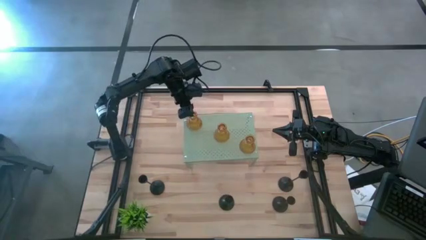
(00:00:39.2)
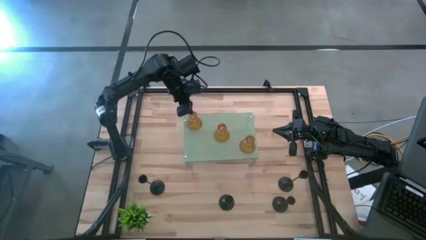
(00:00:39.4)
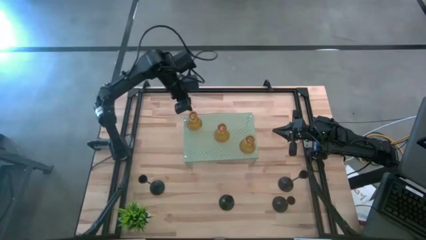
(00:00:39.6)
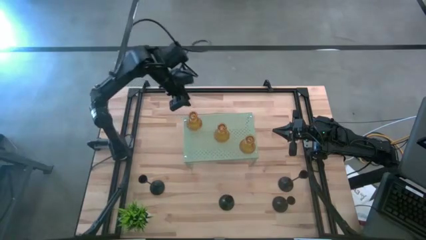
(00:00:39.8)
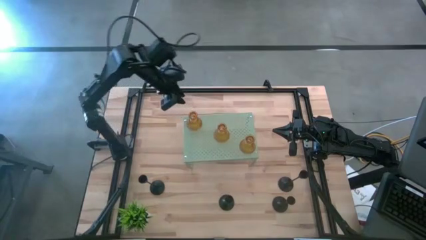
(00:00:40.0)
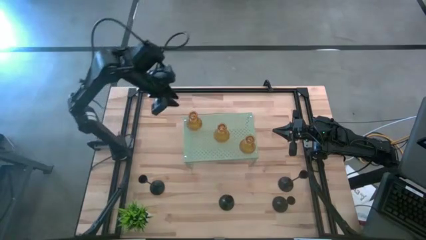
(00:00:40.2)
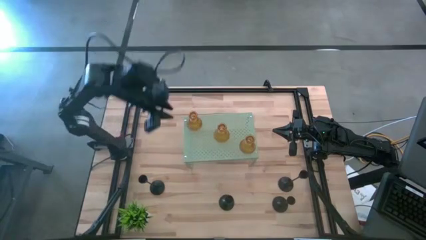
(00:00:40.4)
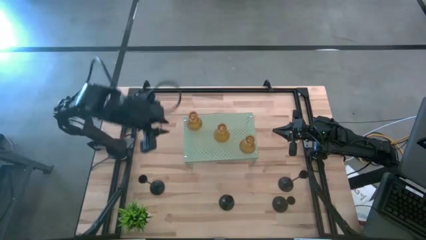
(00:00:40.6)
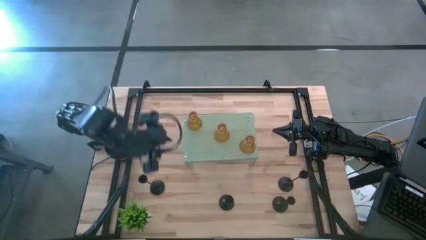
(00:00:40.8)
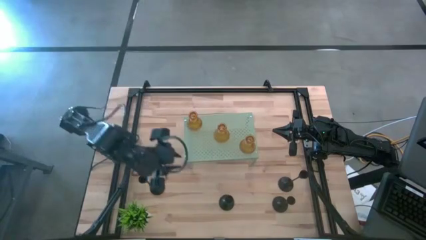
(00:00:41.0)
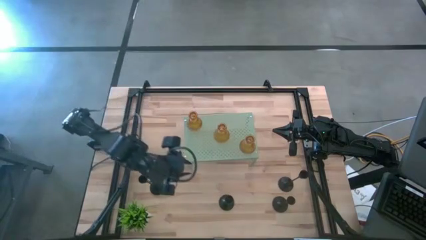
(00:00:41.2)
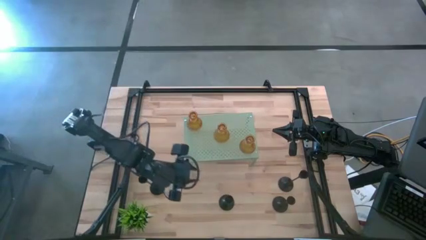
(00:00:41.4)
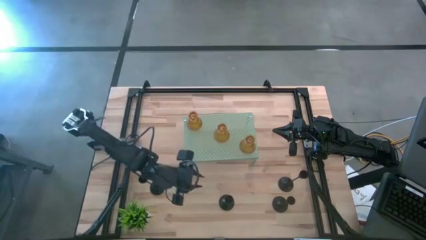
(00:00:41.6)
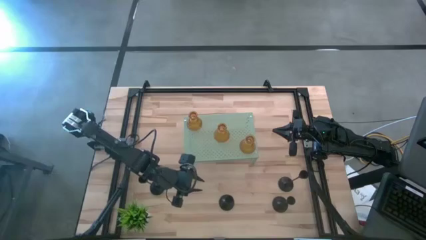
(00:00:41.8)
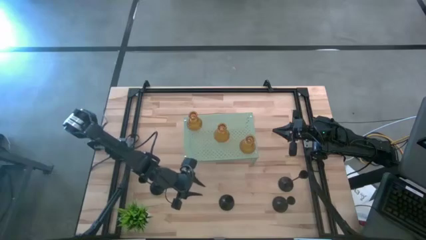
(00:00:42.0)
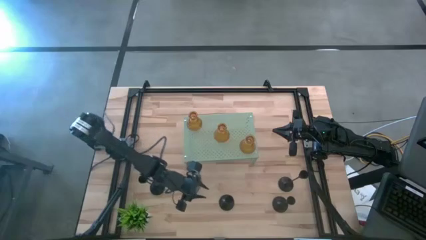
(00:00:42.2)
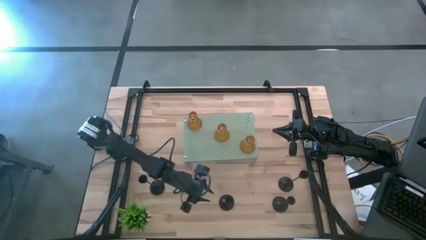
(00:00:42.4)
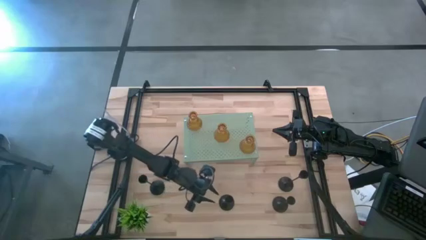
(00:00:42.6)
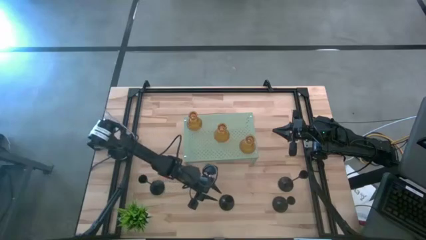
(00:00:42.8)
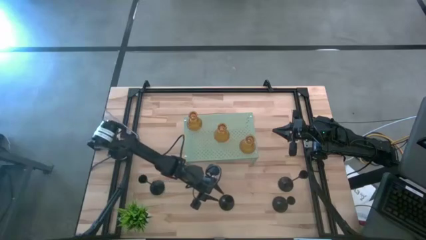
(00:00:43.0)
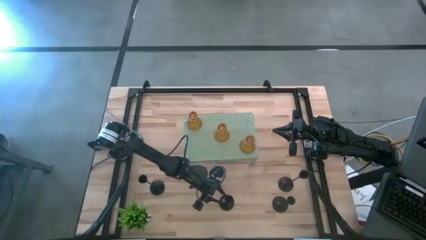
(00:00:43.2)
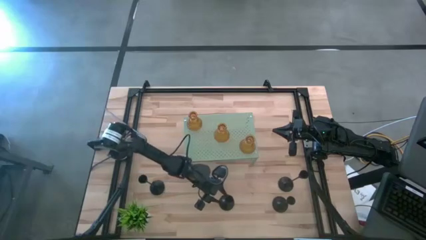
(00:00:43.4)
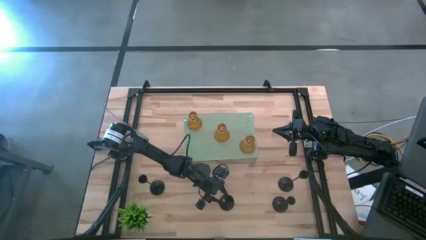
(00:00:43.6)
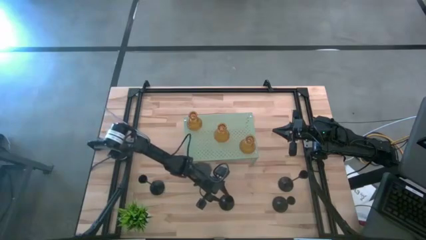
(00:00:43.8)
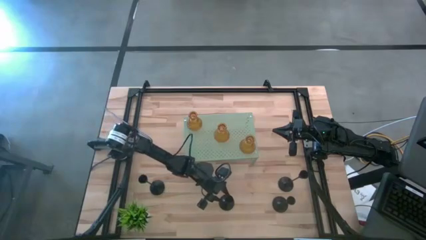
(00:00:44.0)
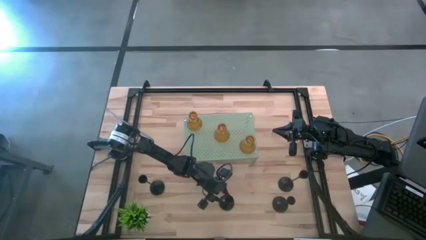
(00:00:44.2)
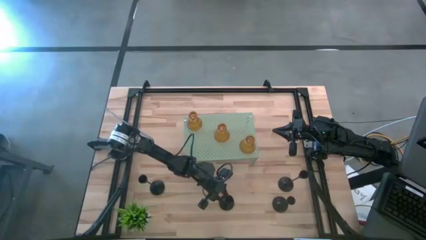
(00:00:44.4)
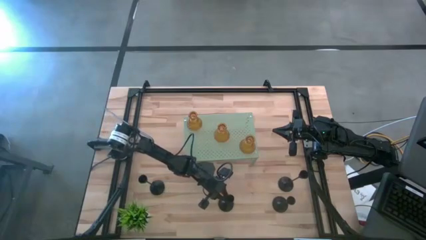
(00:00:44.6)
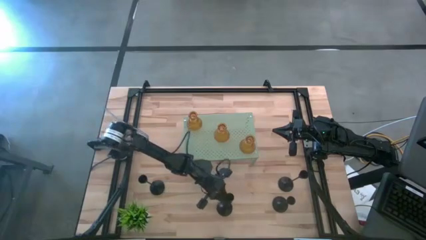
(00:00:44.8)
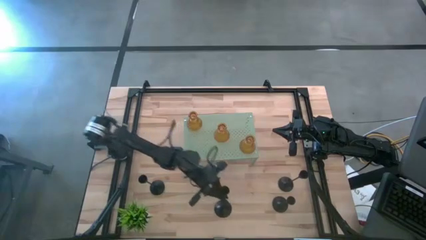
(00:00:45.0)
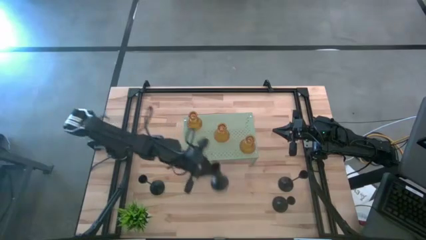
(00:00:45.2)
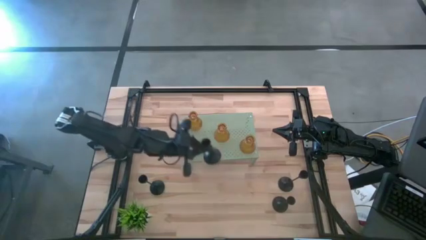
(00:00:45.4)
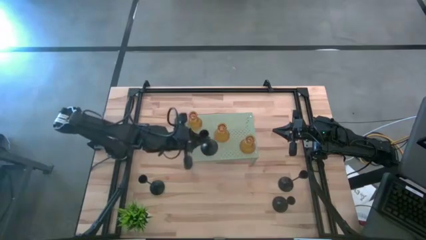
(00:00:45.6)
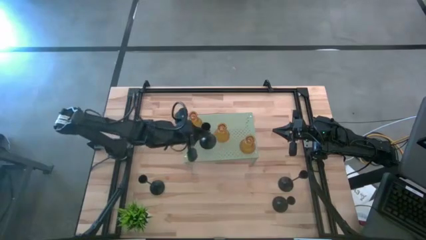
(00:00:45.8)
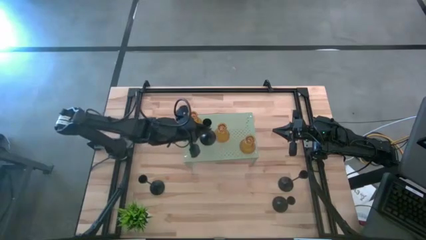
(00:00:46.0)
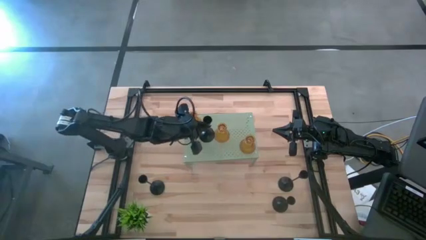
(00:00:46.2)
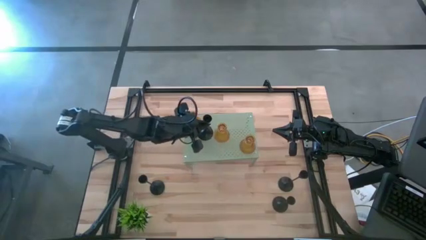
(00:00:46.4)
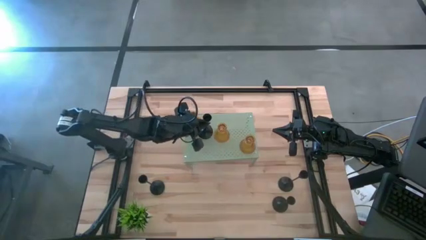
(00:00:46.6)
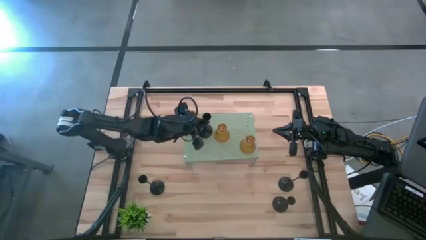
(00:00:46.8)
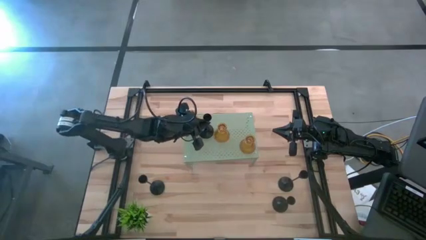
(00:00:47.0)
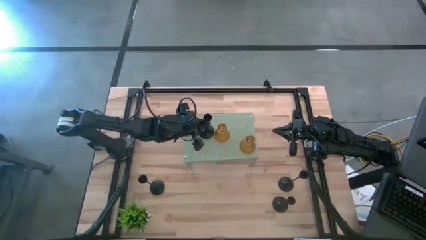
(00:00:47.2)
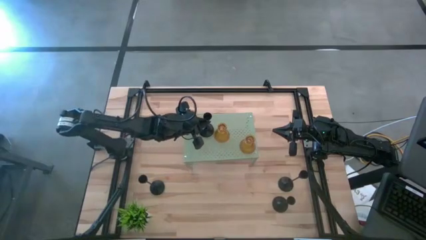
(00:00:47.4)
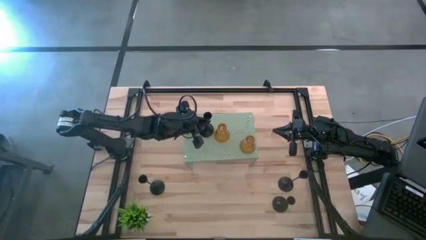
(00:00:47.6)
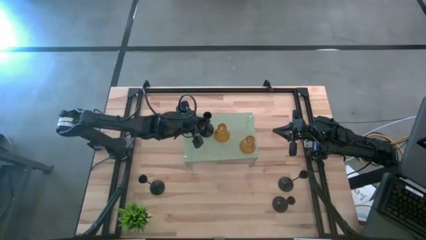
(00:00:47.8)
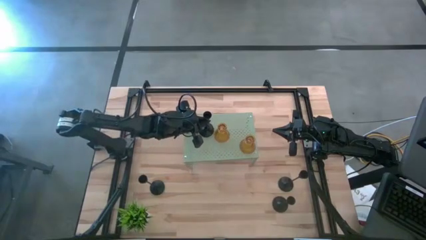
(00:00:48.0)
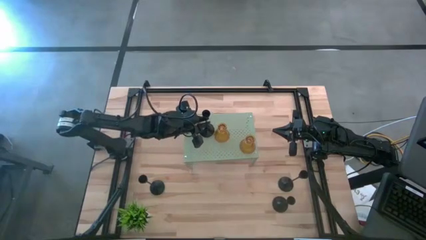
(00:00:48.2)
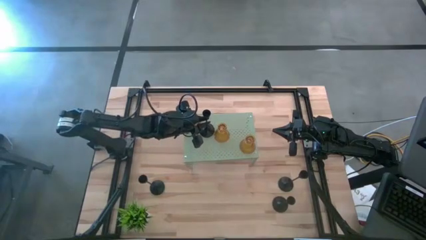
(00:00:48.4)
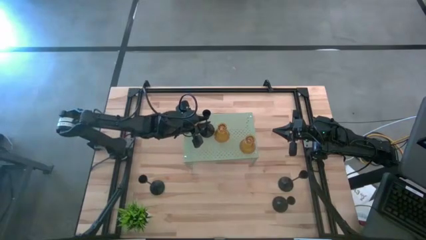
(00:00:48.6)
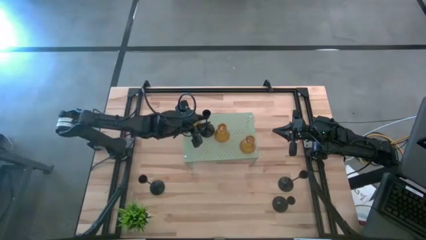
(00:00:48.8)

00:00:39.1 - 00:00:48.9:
Task: Pick & Place candle stick holders
Put the black candle holder on the shelf

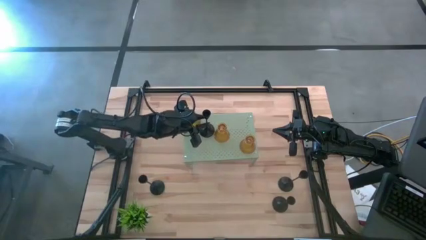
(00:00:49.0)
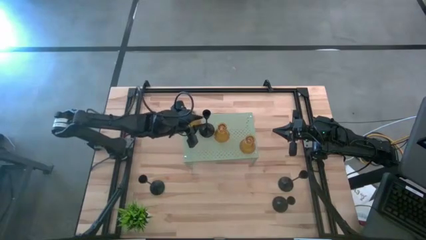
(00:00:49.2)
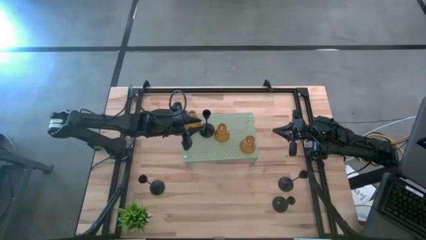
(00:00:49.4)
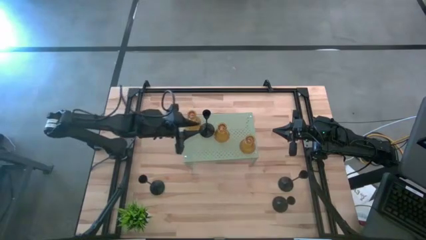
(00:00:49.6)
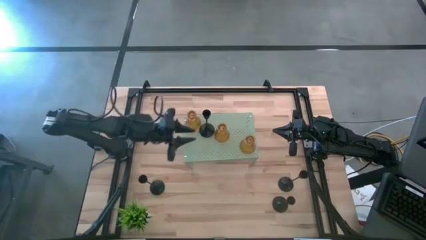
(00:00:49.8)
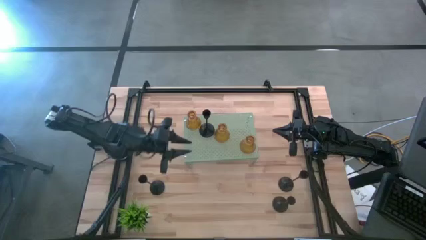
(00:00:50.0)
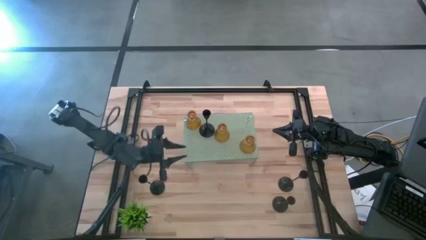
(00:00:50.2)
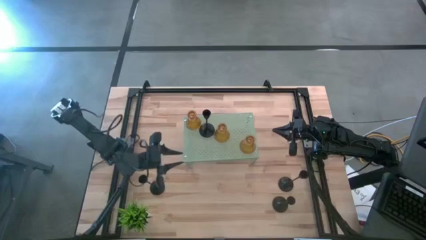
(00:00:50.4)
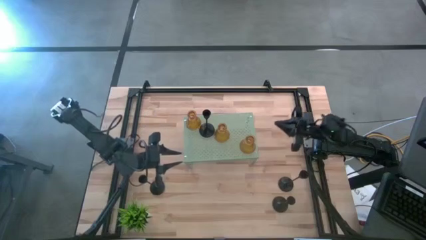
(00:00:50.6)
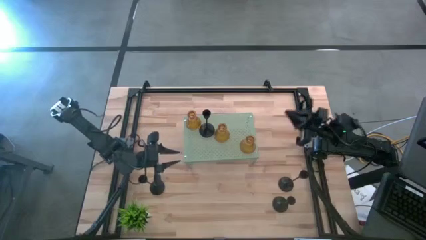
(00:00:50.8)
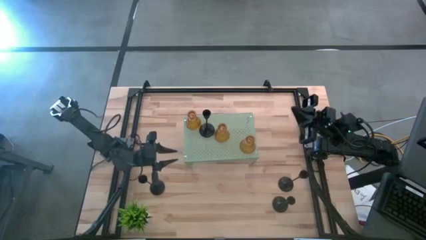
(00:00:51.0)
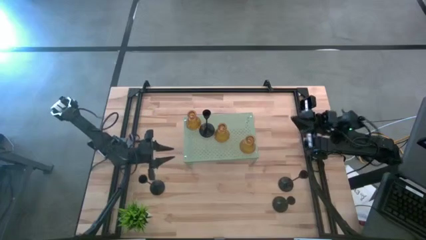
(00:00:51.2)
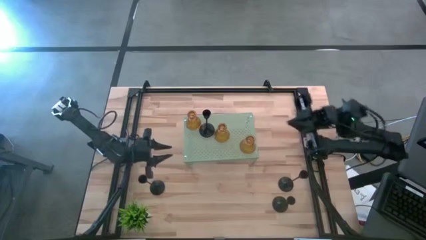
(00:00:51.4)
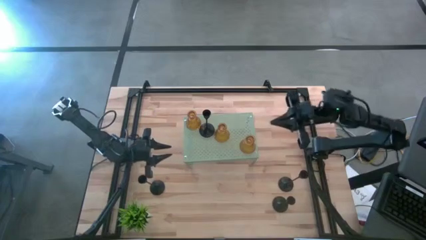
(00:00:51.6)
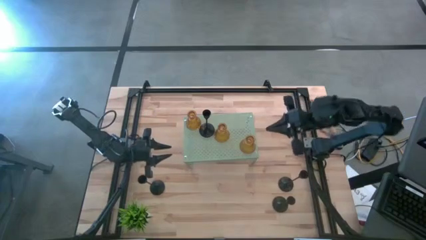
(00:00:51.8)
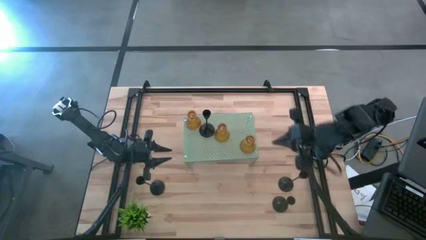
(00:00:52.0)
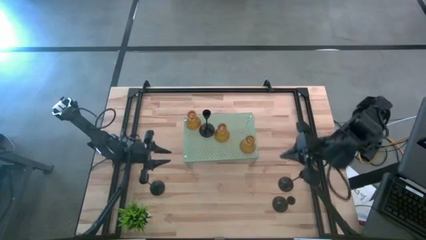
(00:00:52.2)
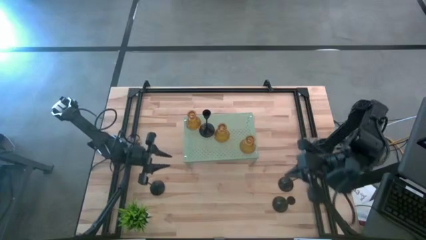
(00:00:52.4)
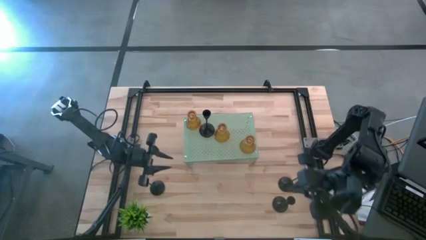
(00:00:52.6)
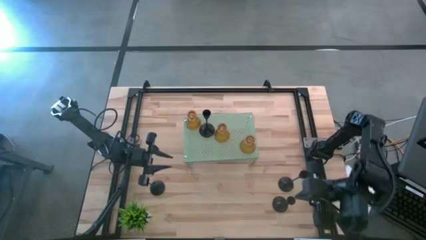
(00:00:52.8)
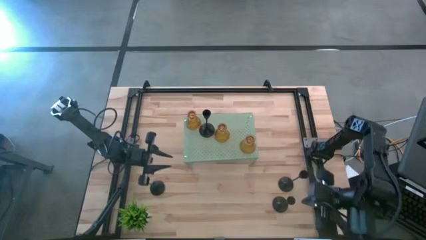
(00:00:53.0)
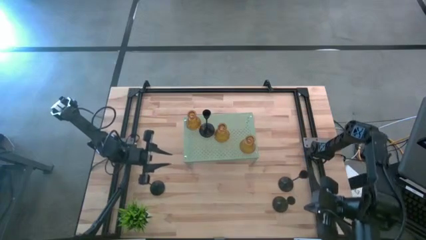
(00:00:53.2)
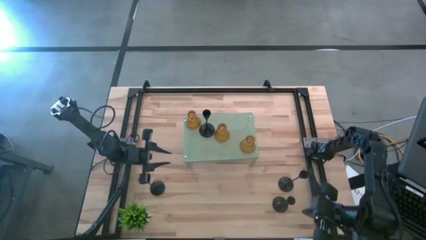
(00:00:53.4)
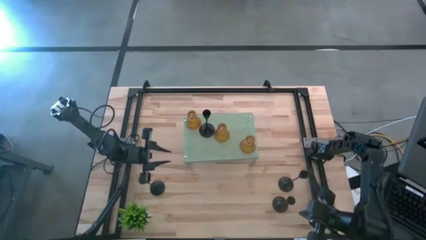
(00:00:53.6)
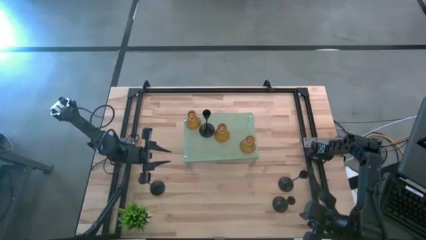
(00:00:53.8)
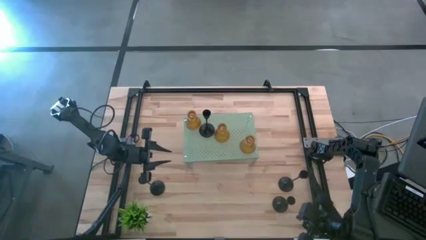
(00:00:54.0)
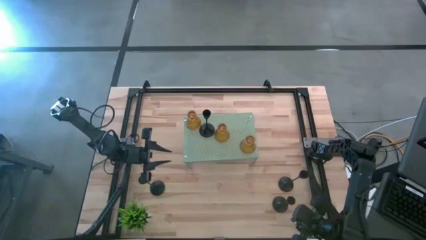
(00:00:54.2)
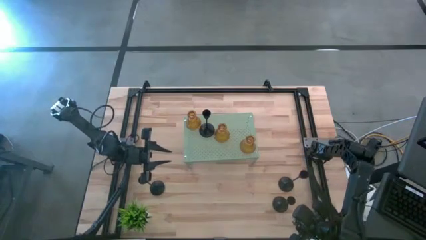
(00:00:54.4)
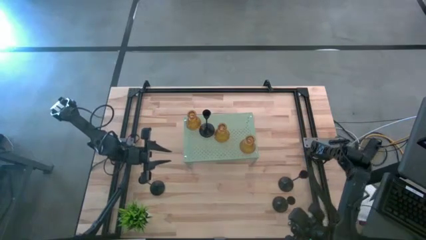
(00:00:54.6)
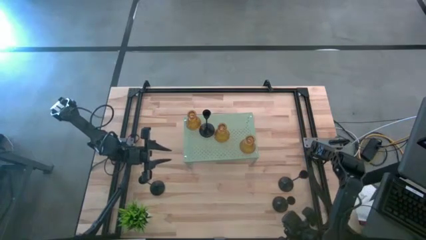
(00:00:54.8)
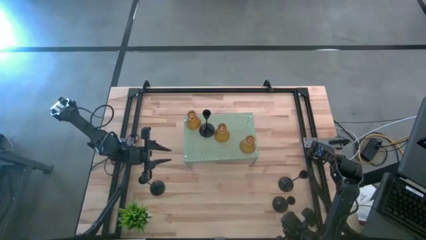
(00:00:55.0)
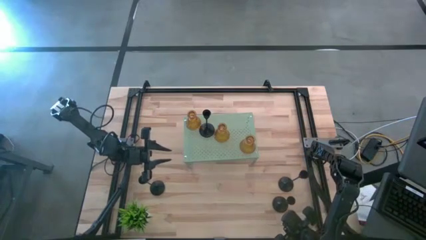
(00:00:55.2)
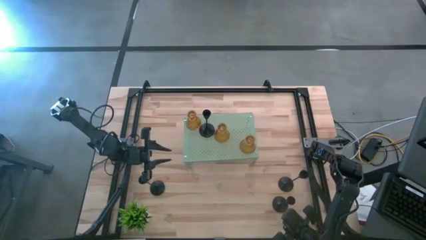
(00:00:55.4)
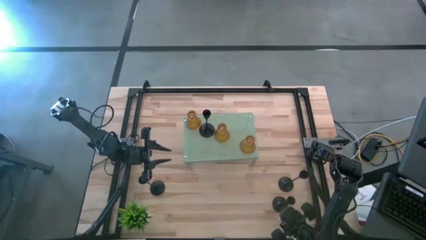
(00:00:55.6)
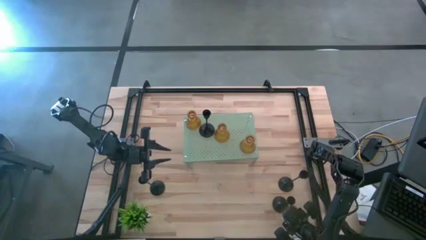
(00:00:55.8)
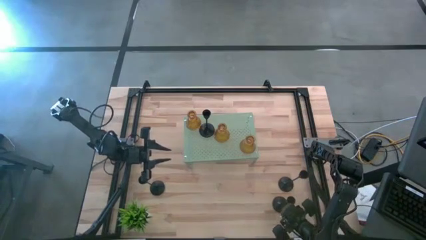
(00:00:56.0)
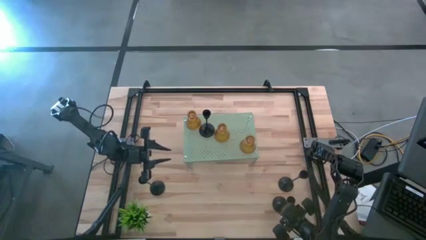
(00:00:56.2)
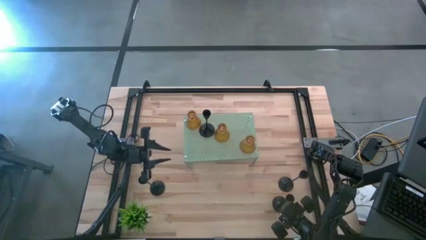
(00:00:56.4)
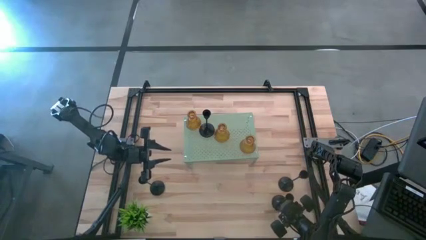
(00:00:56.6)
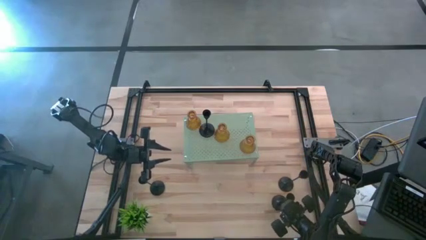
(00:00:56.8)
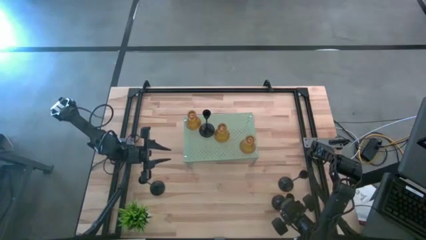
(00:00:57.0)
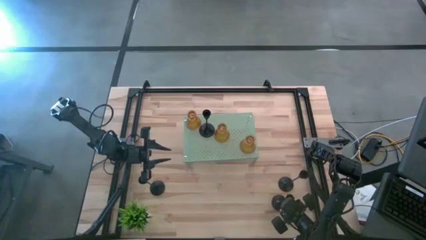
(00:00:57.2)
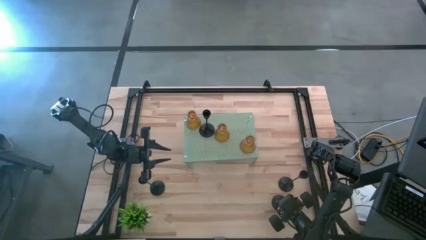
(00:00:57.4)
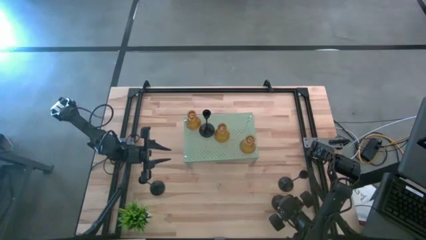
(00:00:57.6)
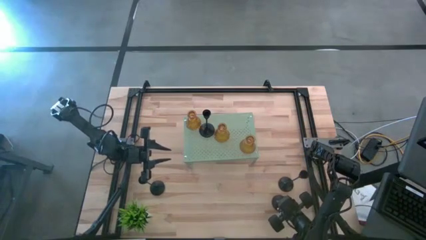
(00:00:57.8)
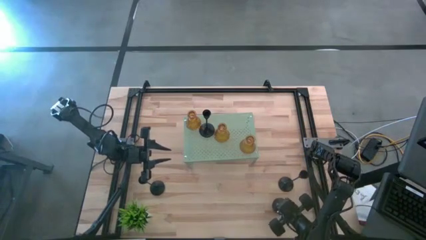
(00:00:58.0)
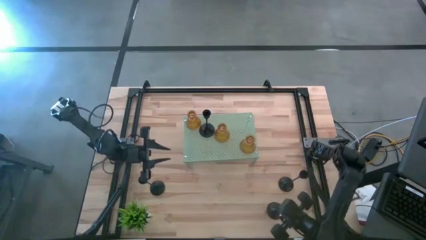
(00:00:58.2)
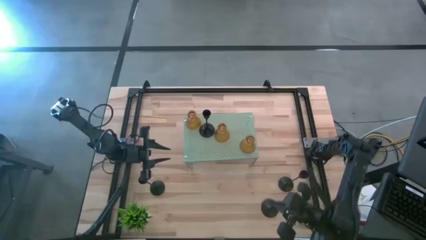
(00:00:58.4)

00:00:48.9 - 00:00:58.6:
Put the black candle holder on the shelf
